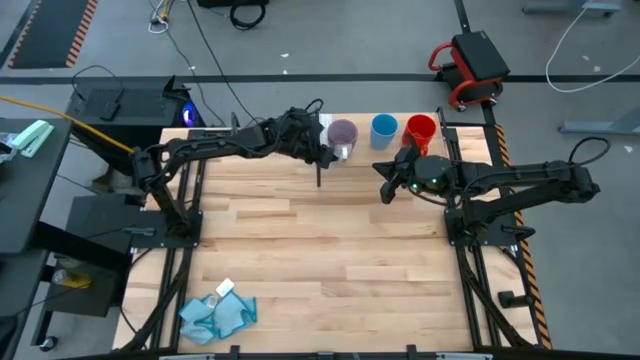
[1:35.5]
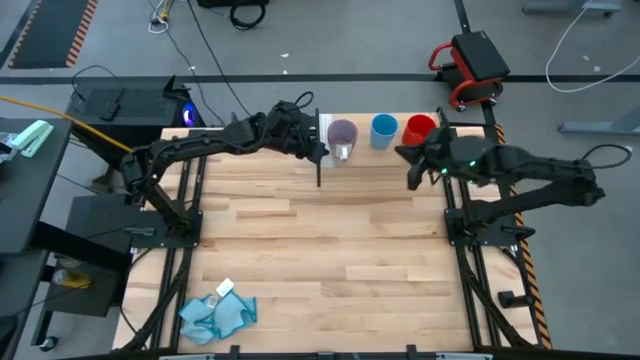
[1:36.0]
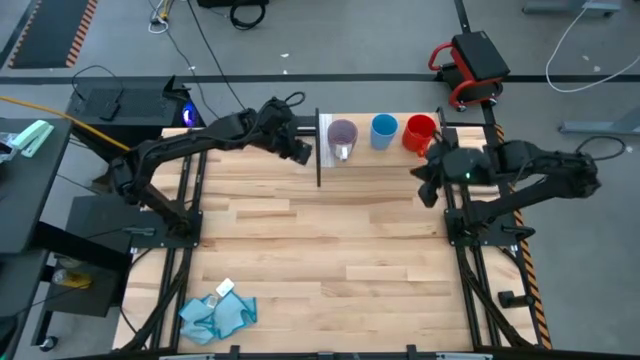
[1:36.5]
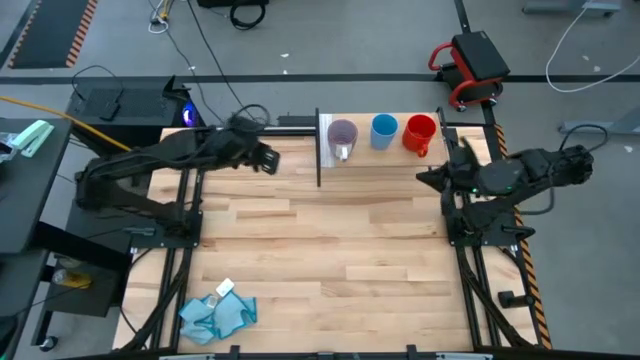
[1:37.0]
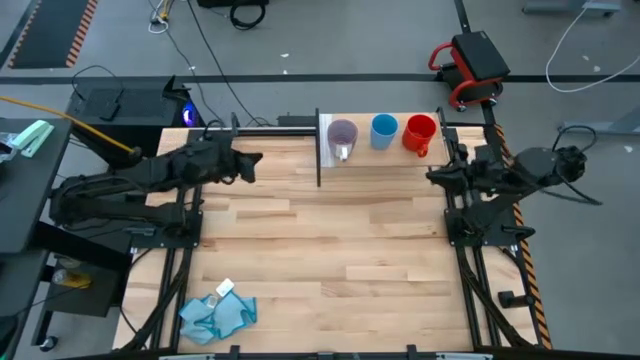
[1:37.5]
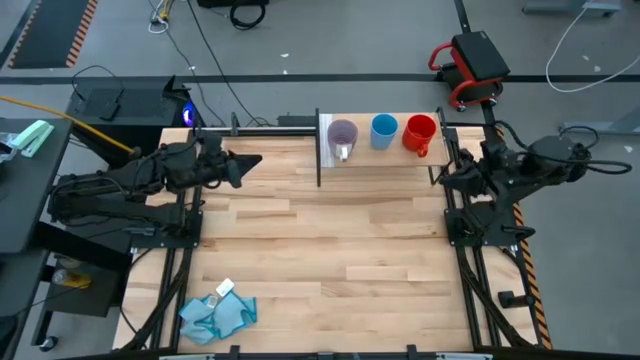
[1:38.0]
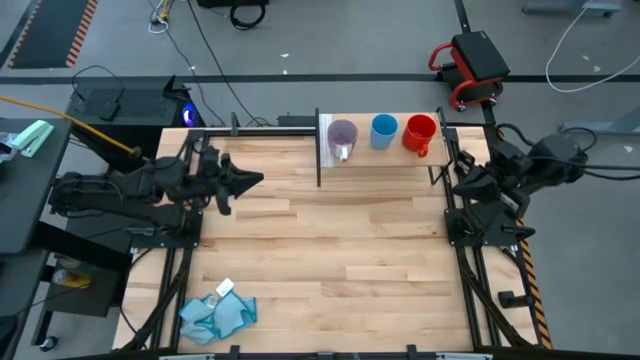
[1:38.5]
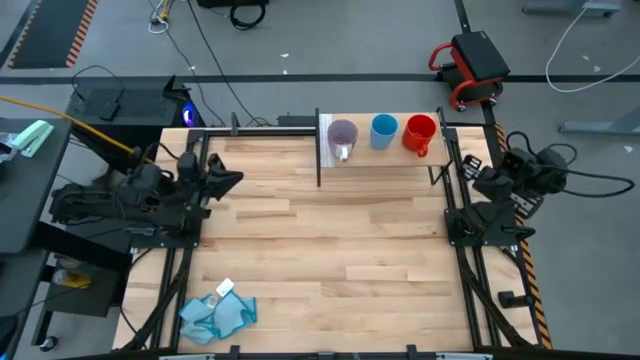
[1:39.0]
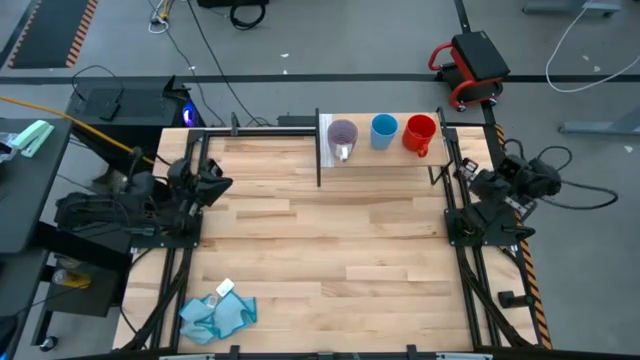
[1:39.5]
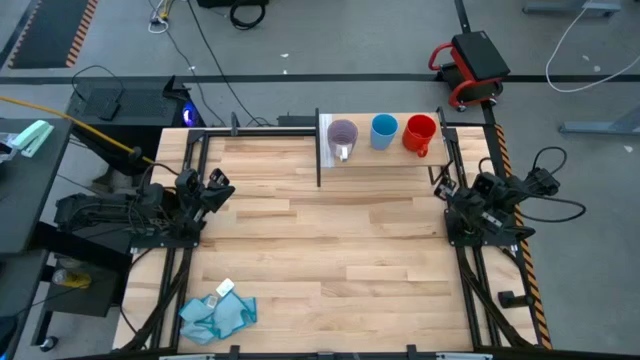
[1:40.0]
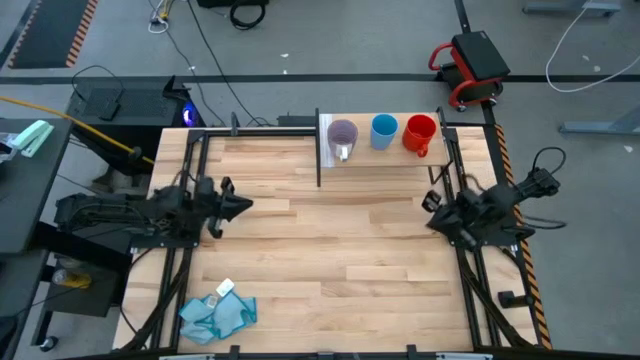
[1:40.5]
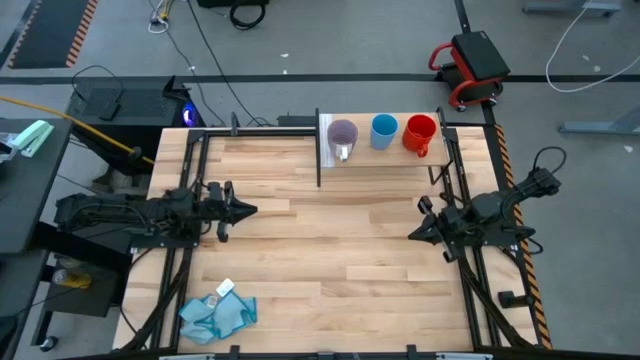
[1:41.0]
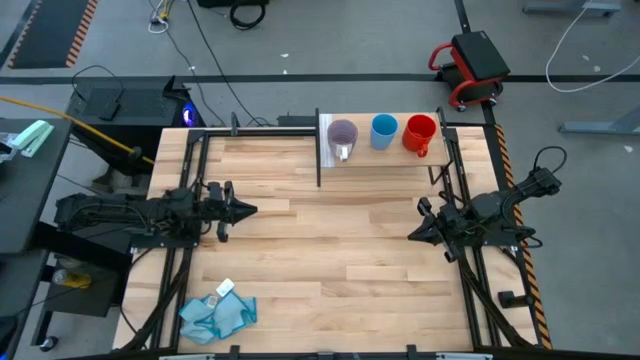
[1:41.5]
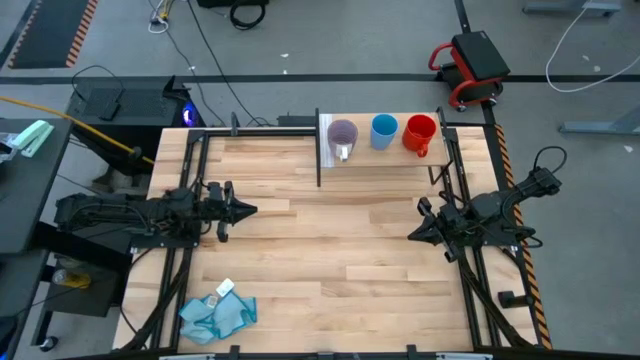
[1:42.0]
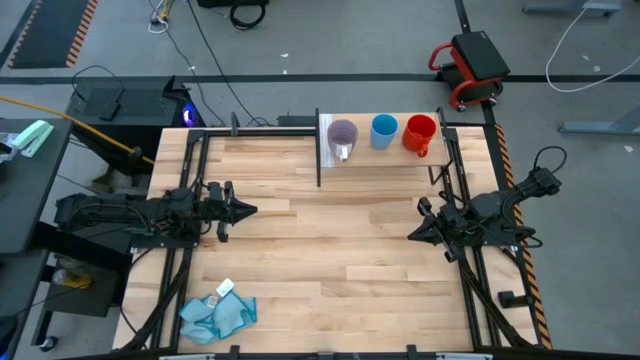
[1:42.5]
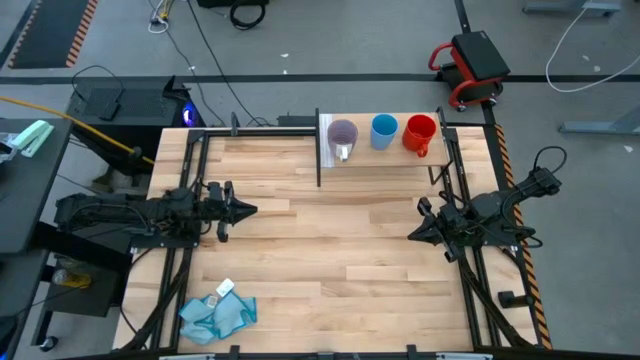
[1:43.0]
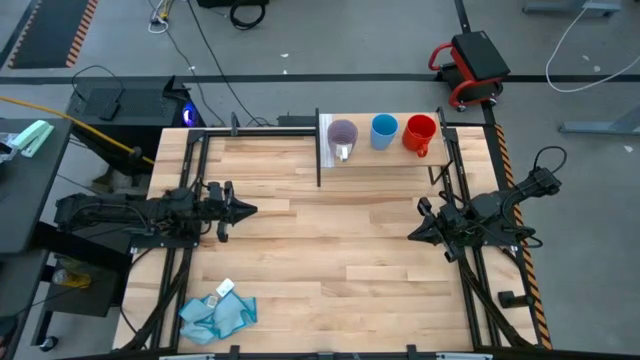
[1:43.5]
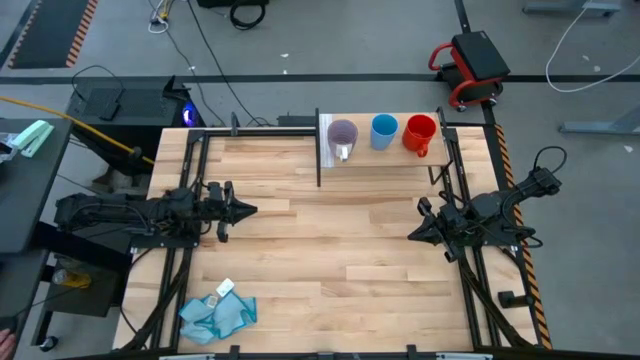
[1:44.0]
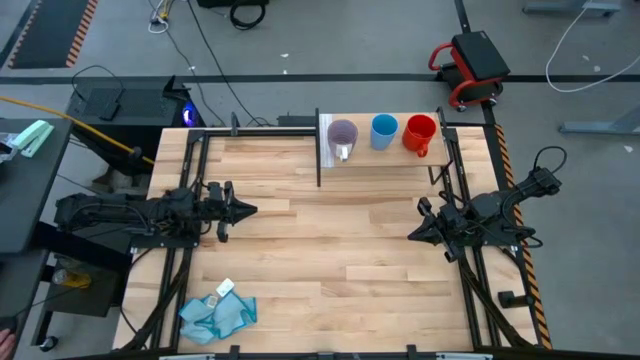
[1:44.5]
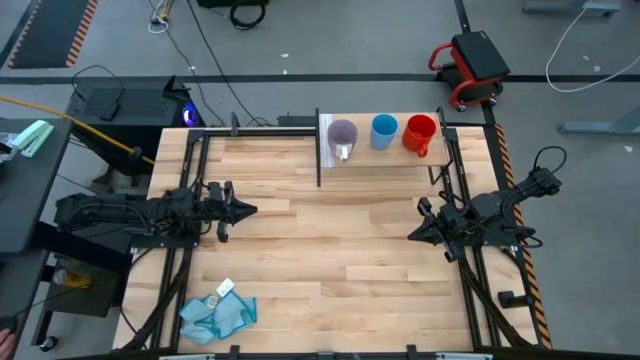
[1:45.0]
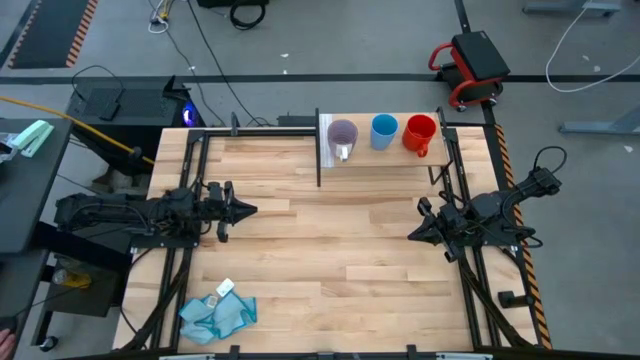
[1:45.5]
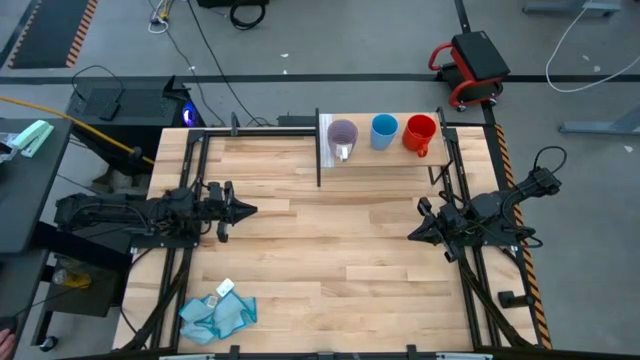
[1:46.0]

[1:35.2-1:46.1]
Task: Stack small to large cups/mugs on shelf
Return to Home Position

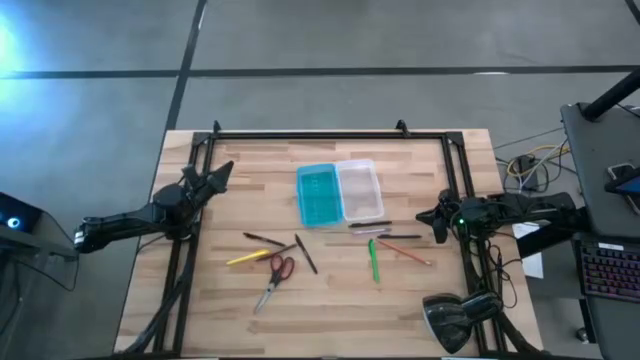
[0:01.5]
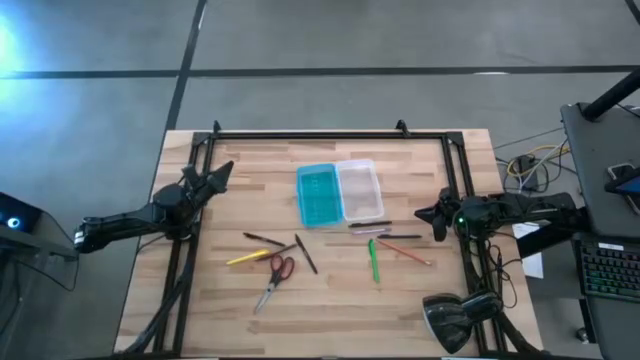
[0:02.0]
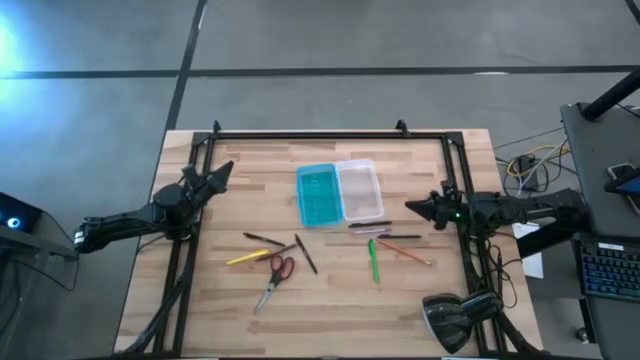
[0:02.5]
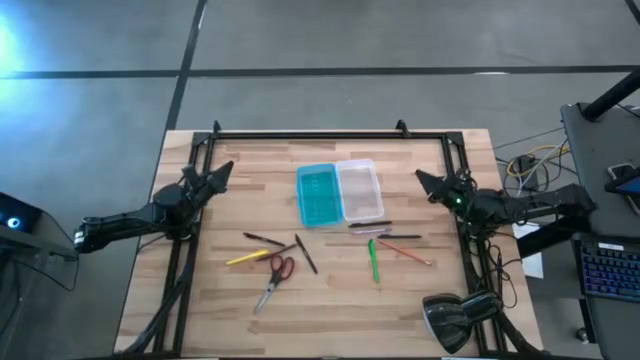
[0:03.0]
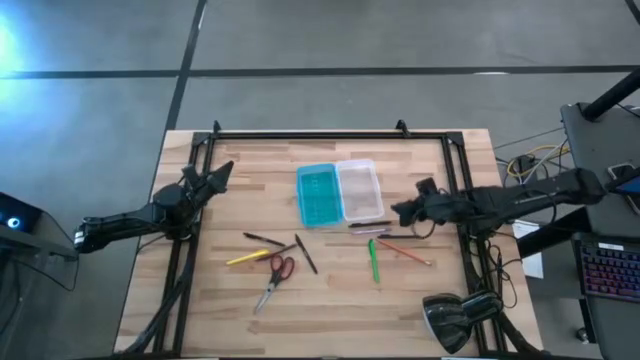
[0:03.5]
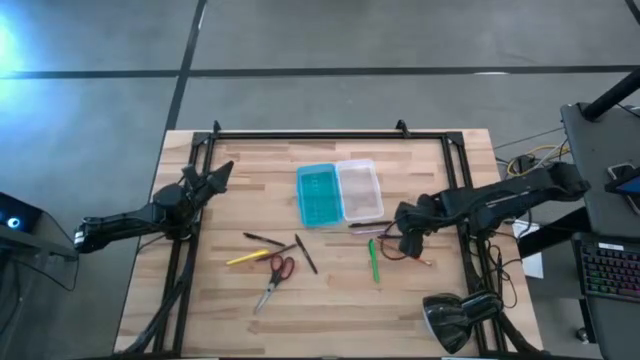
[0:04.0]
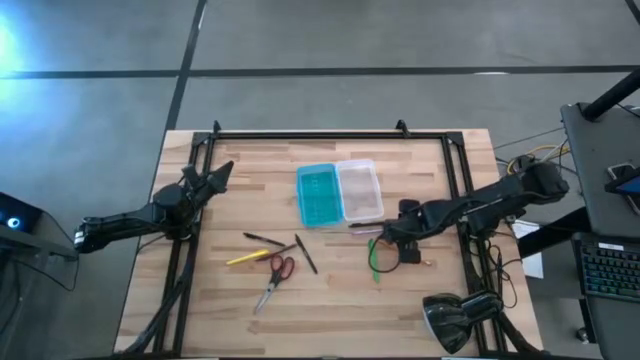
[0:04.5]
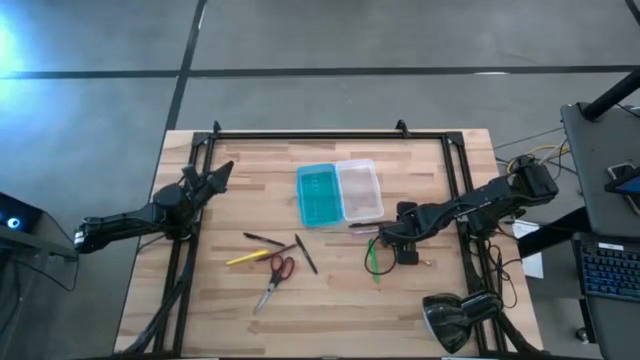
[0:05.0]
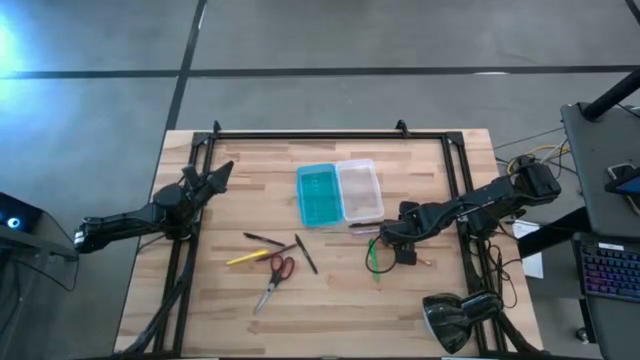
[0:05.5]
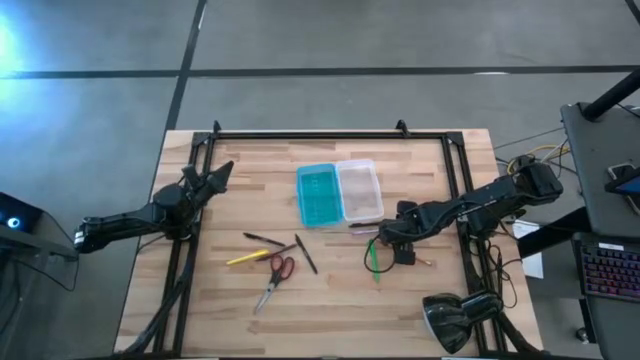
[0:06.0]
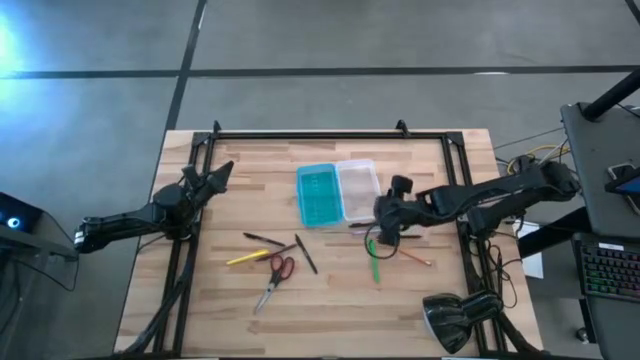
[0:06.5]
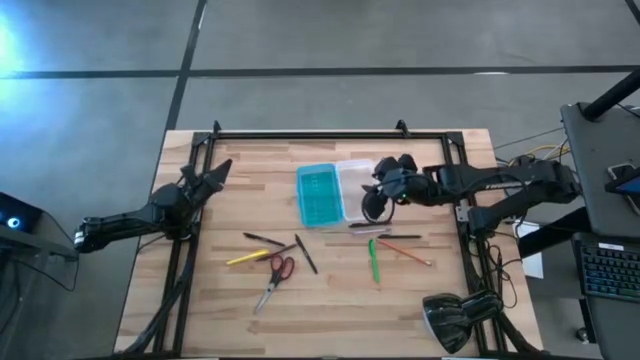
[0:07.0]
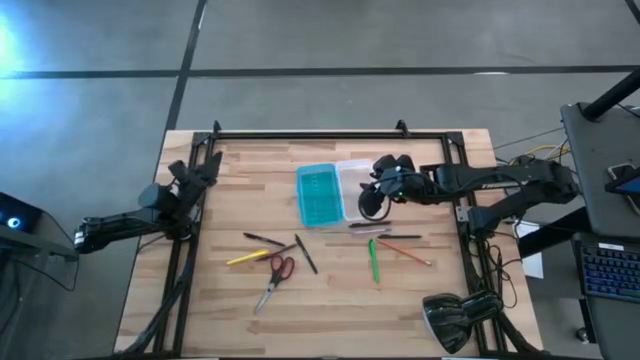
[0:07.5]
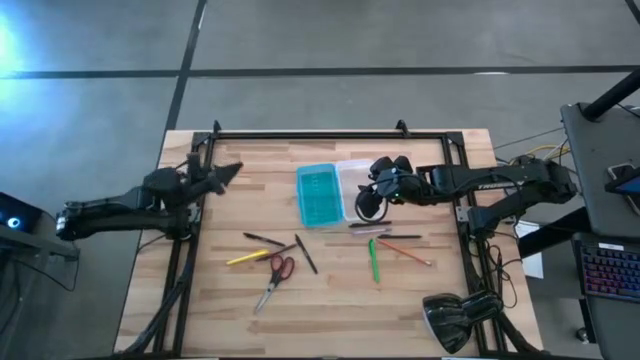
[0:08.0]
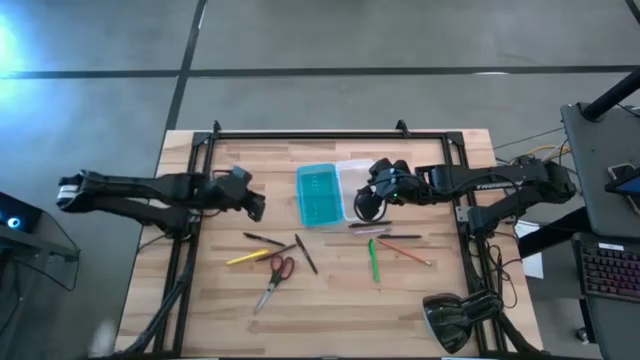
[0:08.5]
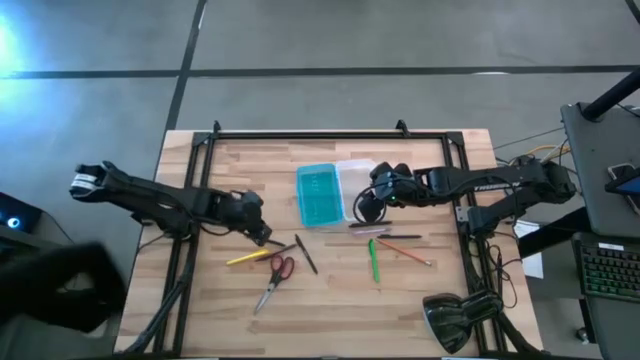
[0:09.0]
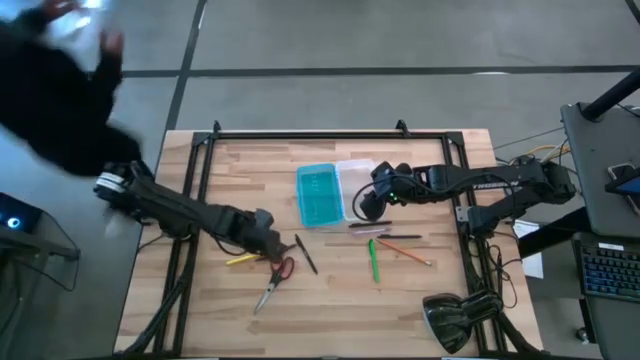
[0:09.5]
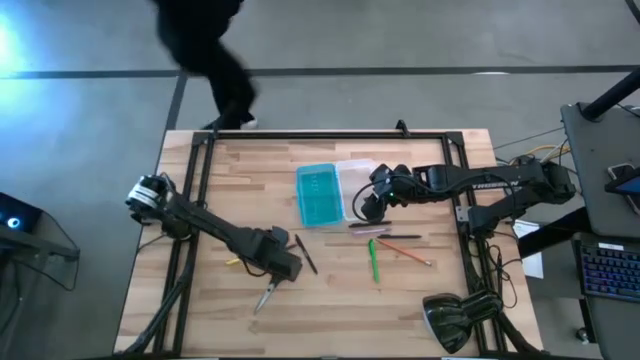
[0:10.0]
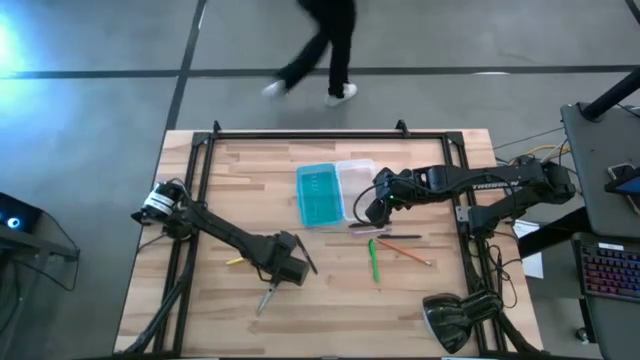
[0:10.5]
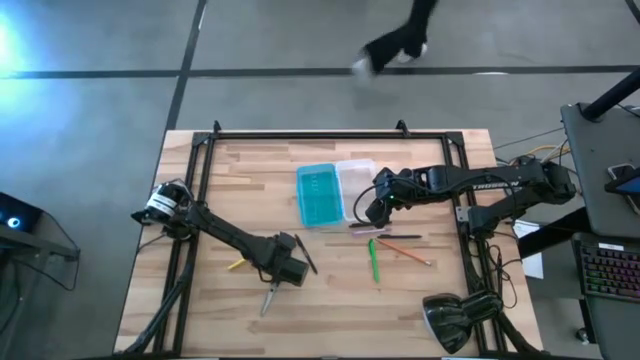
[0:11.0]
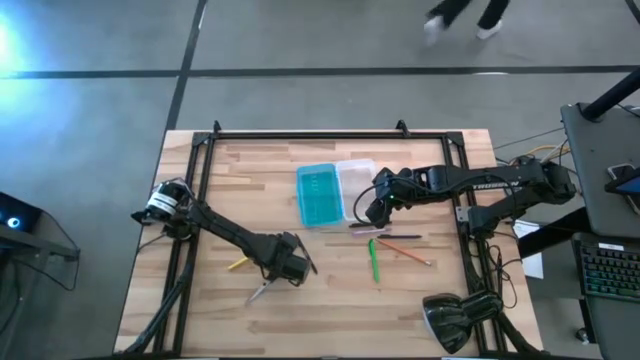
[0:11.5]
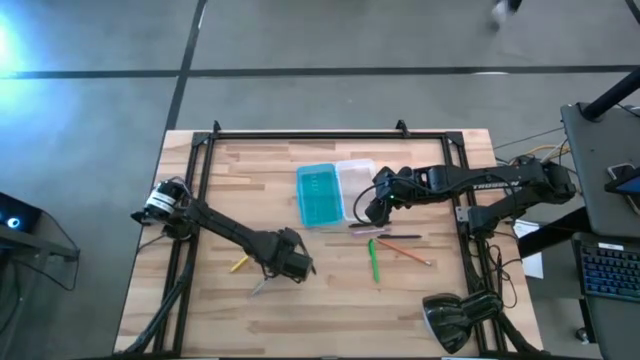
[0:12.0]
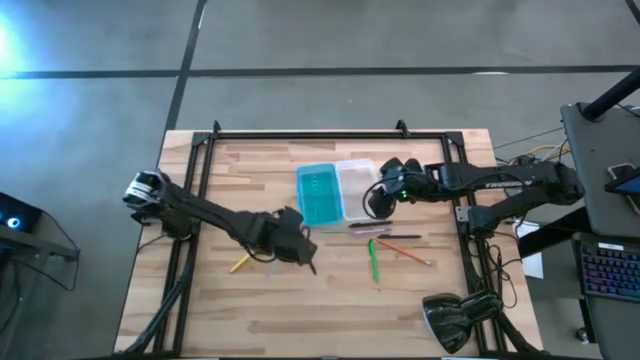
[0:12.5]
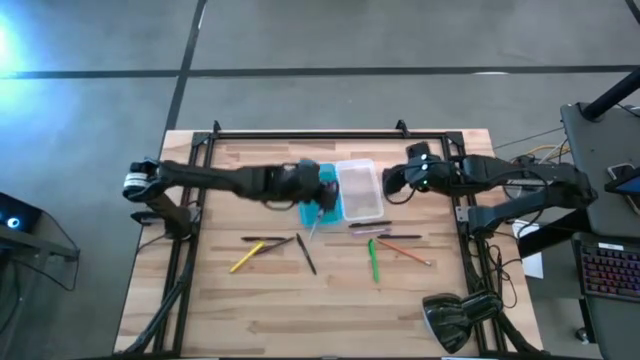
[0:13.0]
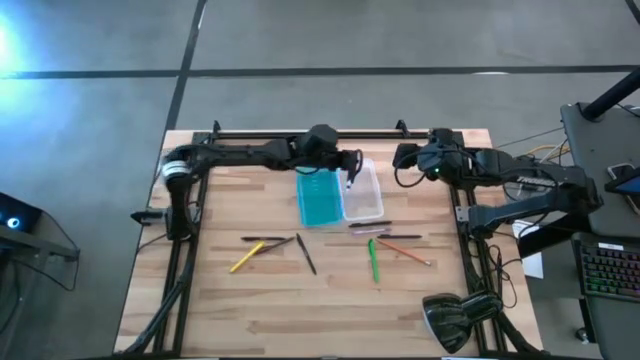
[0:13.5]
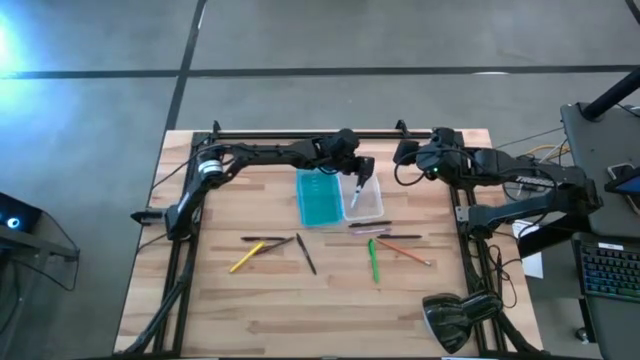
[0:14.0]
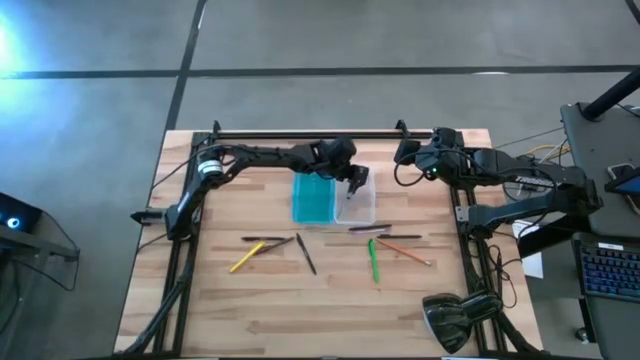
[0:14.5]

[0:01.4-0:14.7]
Task: Pick & place school supplies into a supply box
Put the black scissors into the supply box
